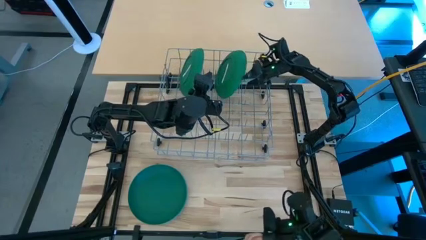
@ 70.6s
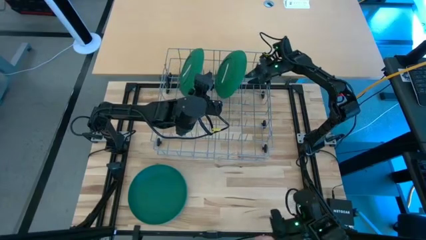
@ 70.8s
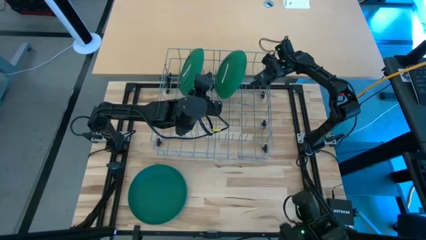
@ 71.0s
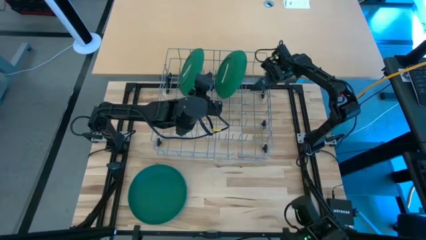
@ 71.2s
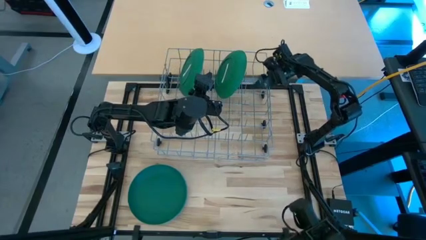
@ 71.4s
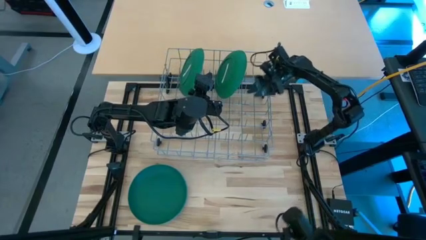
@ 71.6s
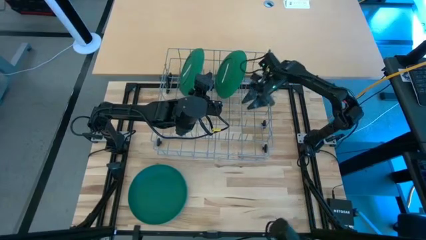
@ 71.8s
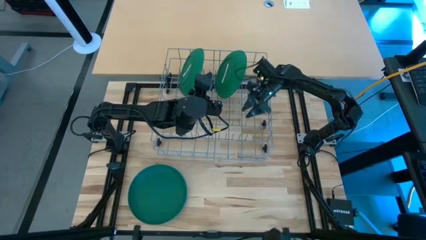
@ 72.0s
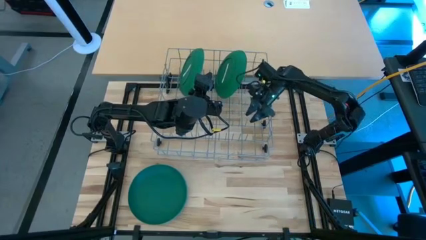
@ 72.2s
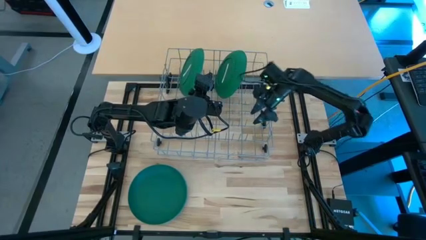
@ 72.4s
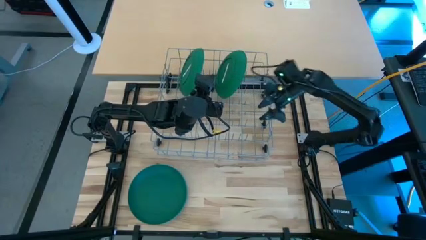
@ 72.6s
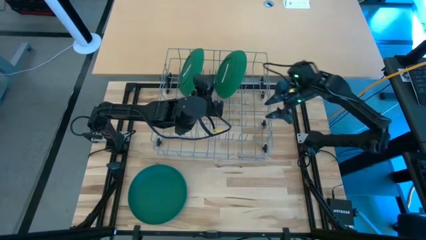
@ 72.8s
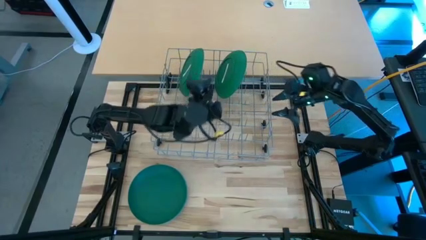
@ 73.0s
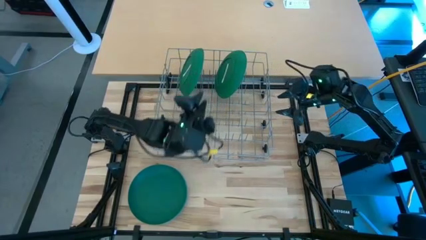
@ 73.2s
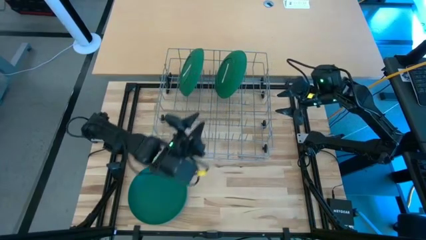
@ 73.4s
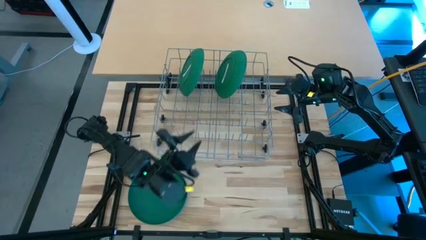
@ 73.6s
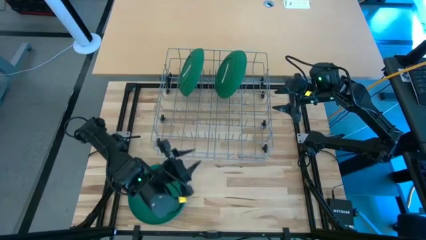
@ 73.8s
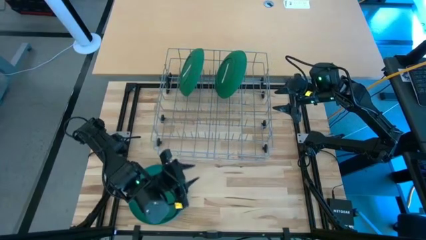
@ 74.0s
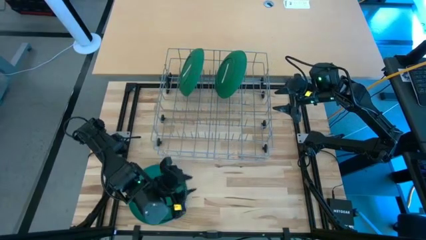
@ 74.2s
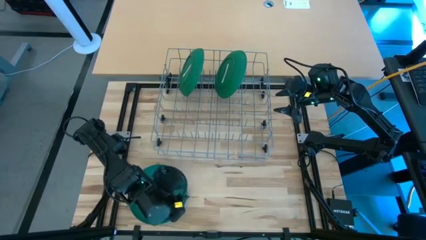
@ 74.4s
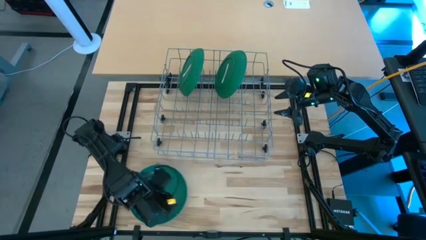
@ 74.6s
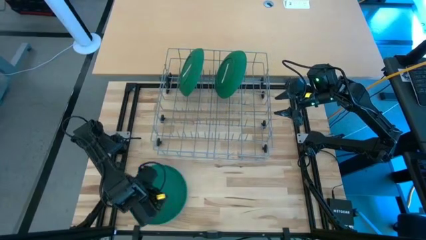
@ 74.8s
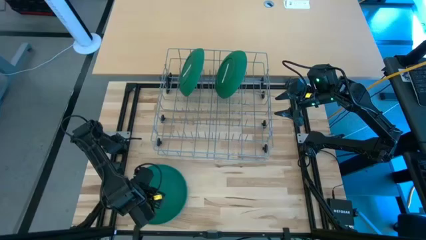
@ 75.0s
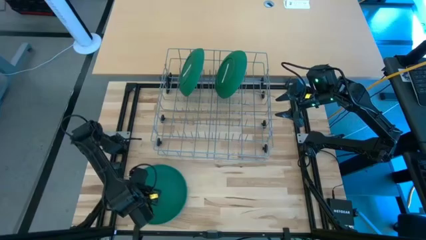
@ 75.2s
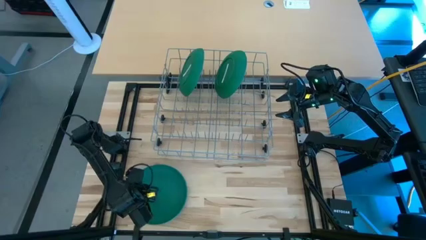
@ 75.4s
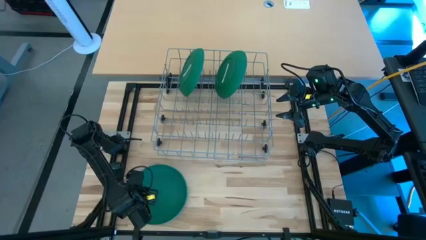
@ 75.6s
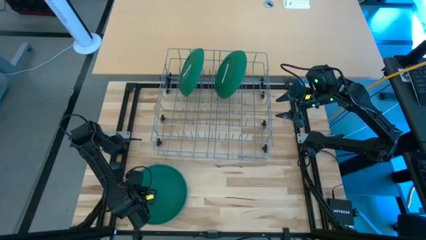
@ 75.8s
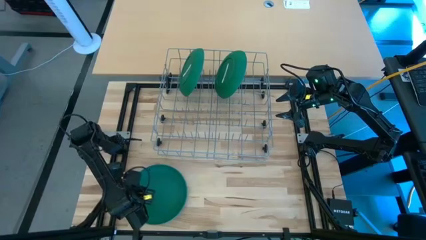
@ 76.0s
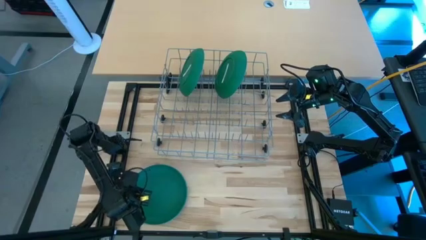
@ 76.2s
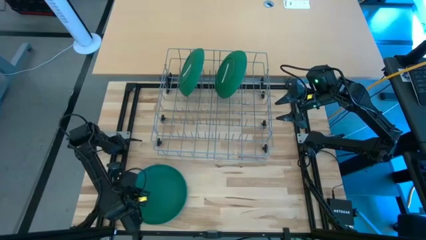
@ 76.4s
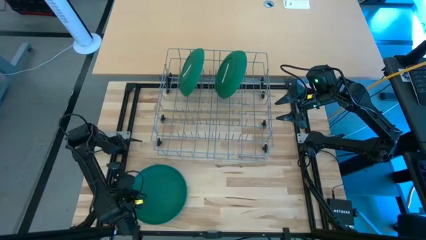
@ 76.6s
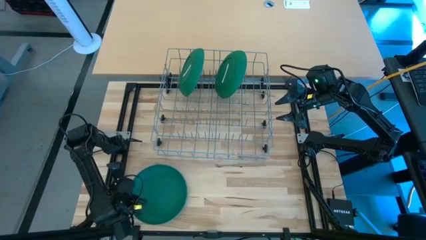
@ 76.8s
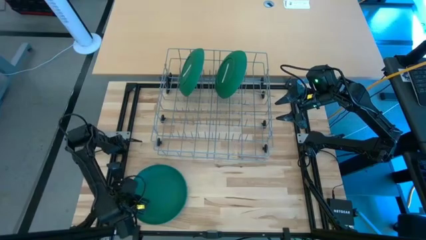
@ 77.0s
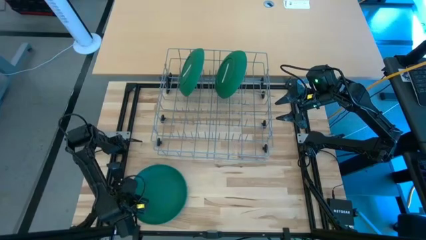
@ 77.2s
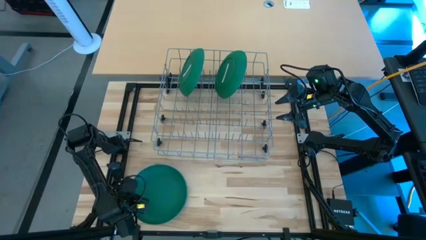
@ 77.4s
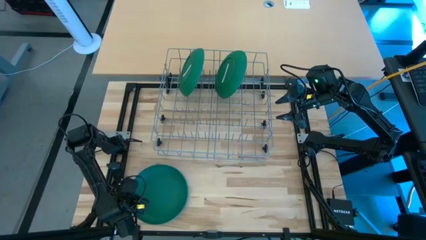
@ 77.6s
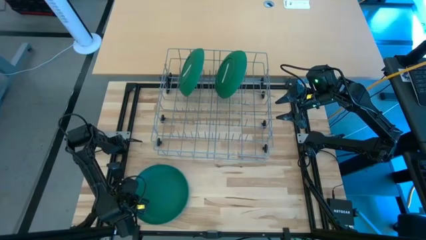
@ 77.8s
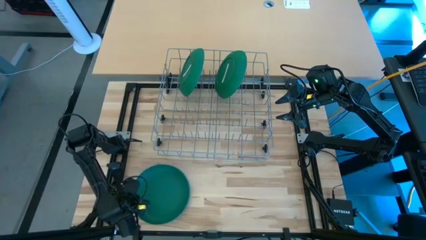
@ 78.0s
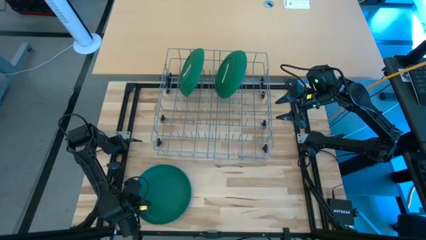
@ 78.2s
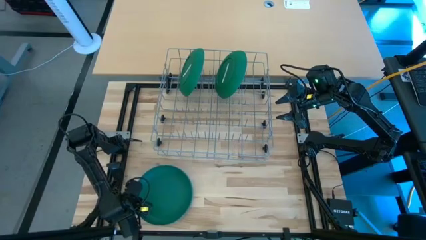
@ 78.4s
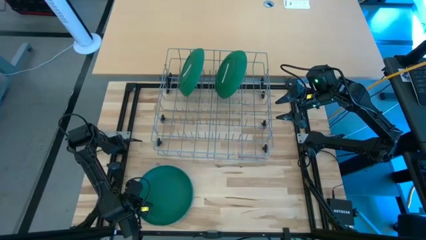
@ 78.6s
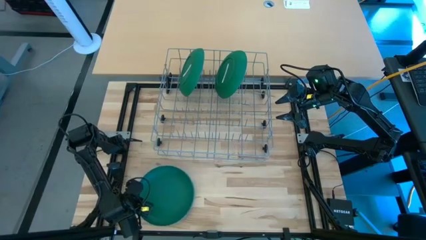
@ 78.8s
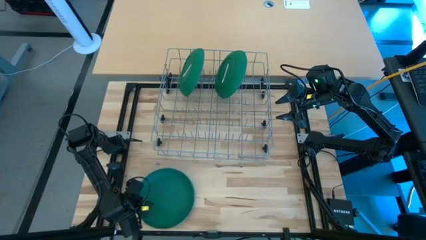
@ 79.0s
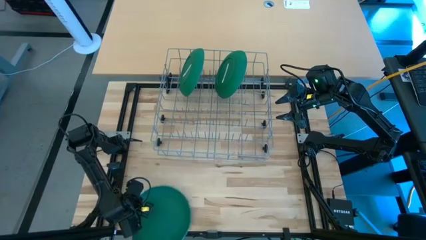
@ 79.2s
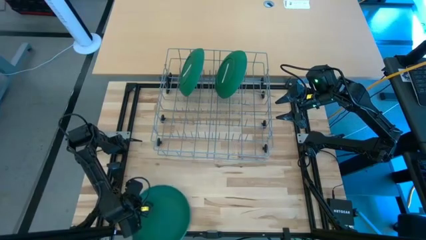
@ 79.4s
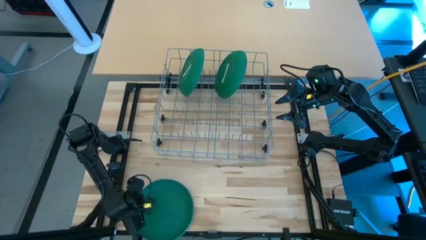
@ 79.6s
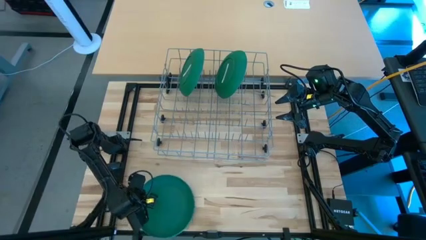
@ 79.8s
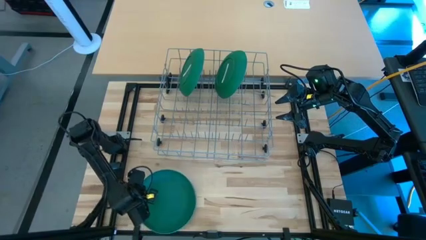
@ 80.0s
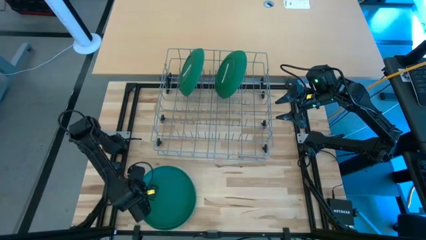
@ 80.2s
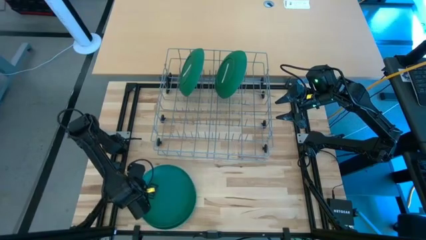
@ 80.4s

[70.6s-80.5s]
Task: Sort dishes
Put the top green plate in the dish rack
